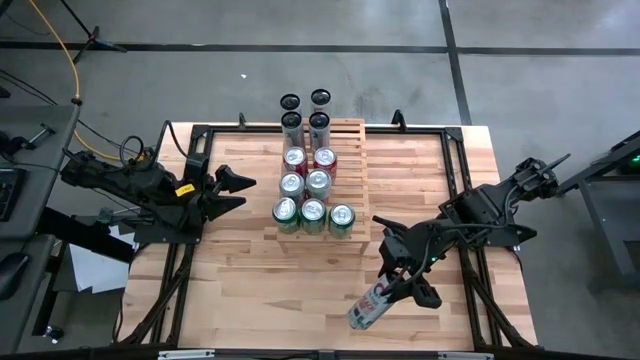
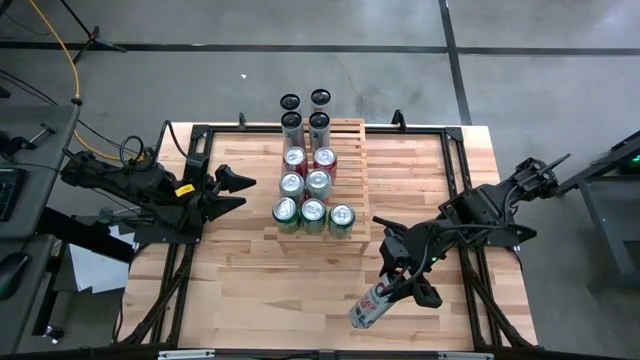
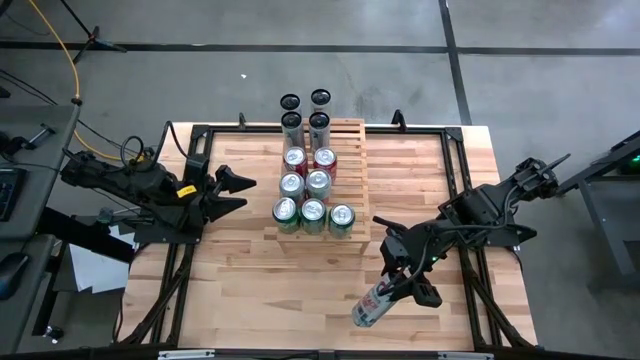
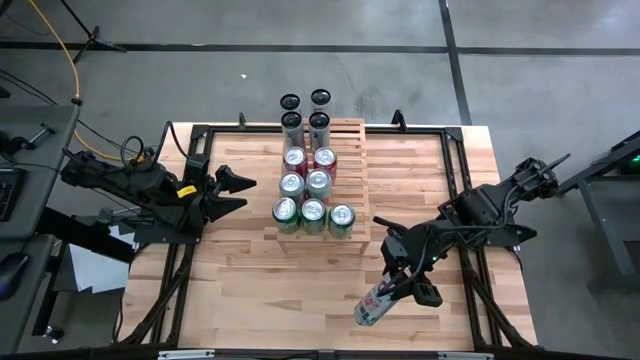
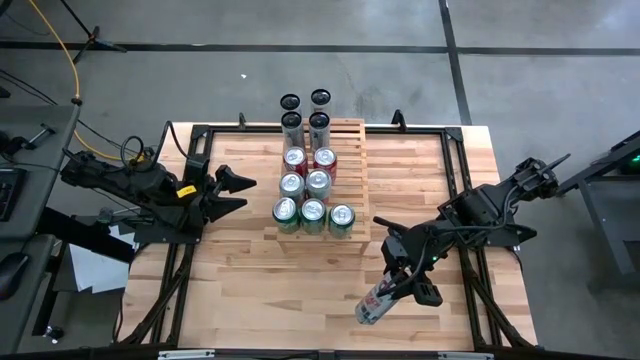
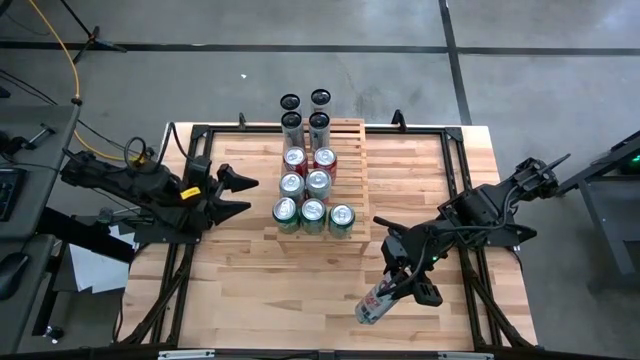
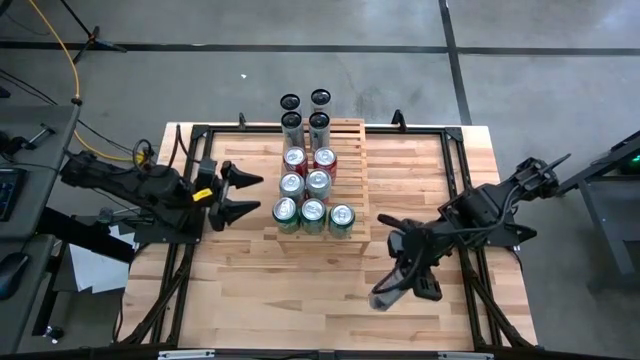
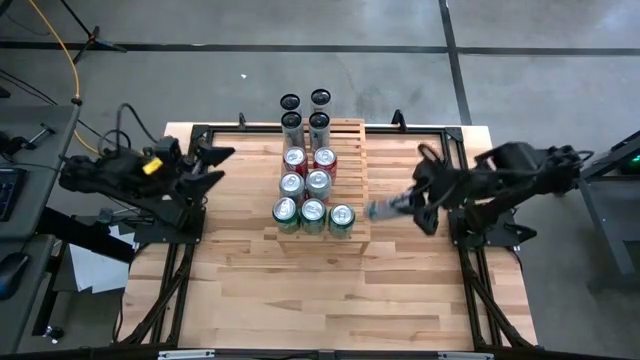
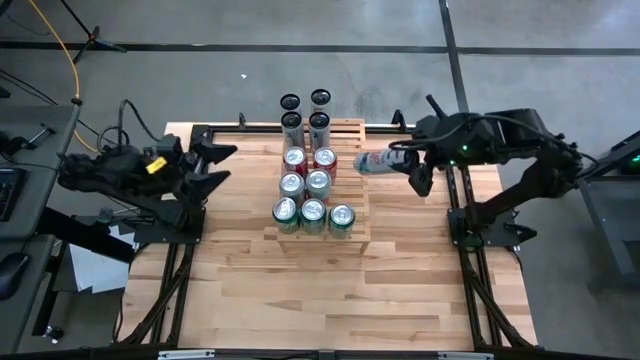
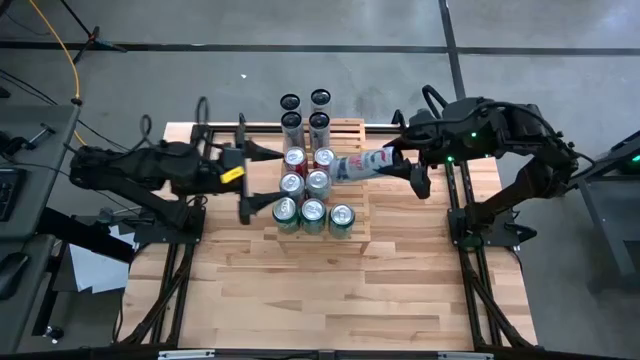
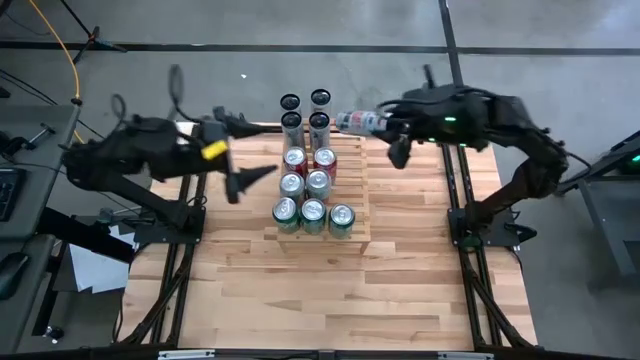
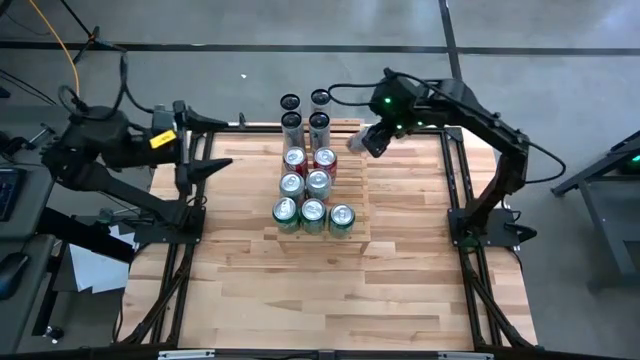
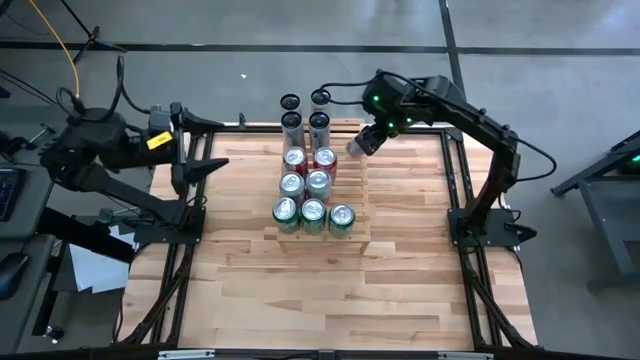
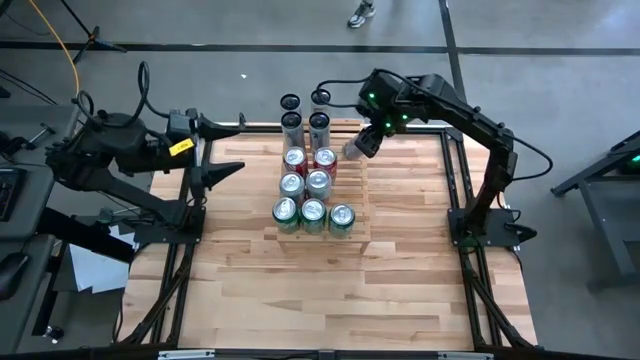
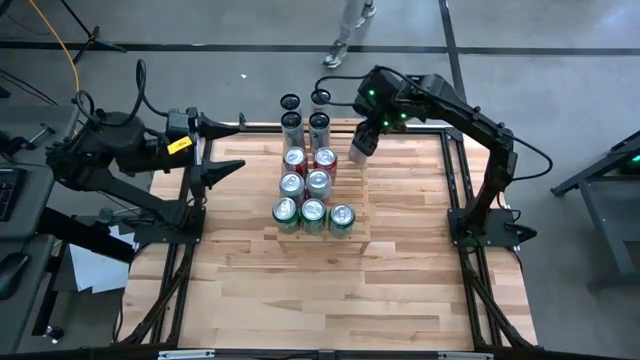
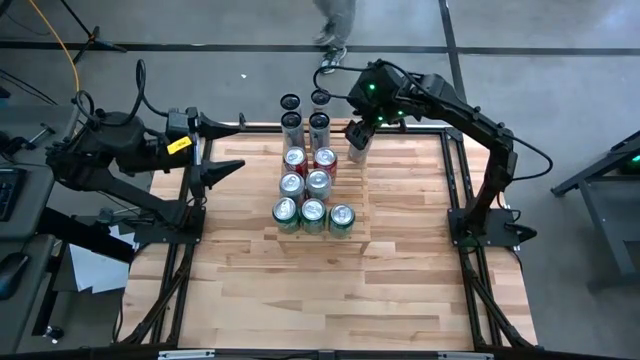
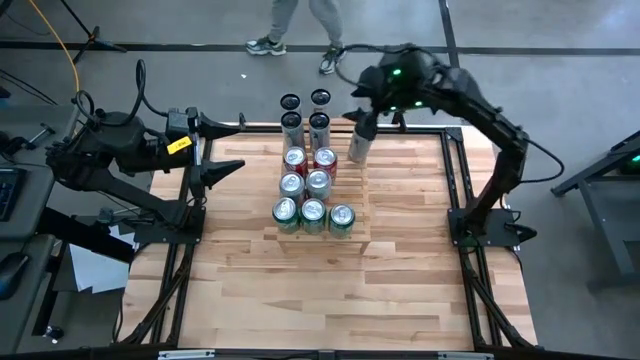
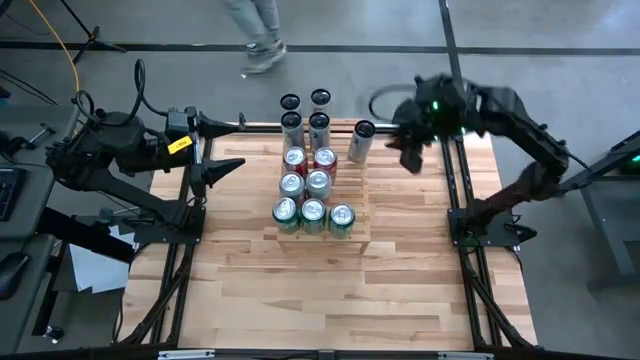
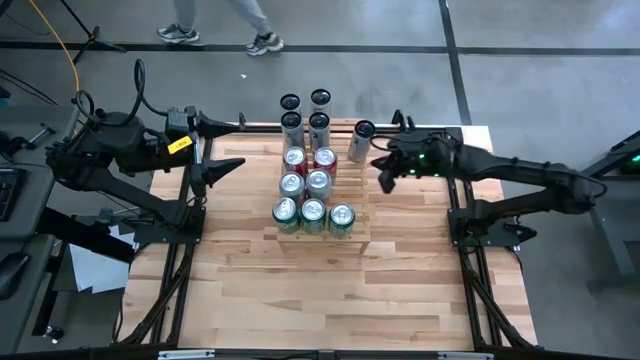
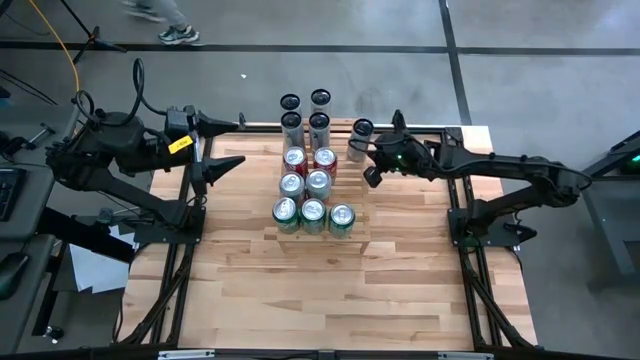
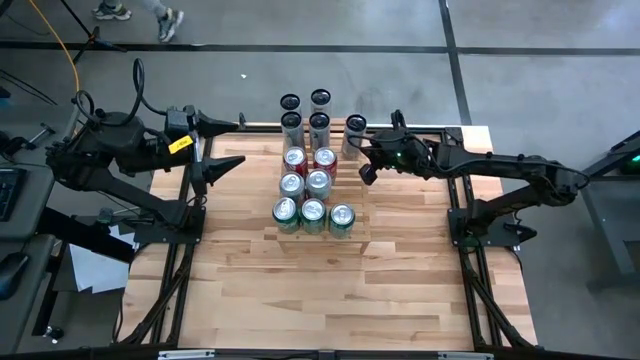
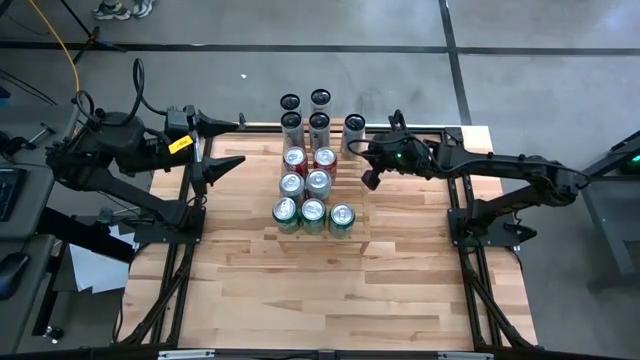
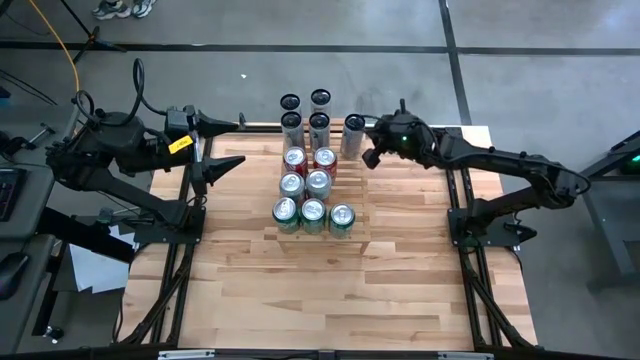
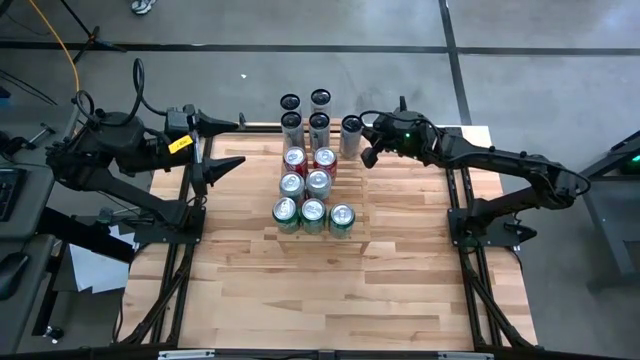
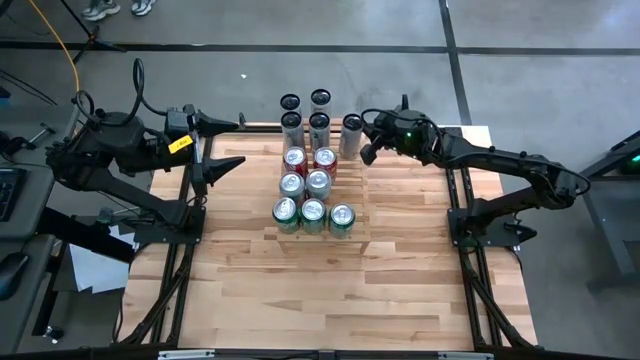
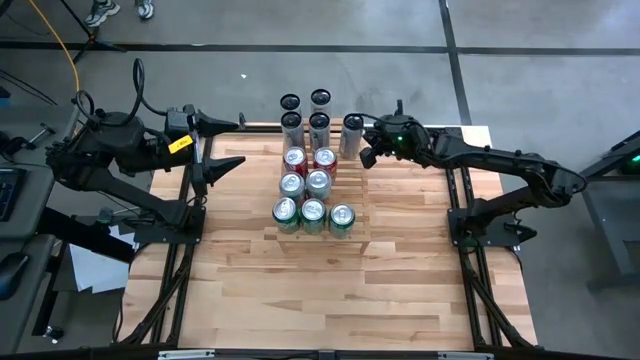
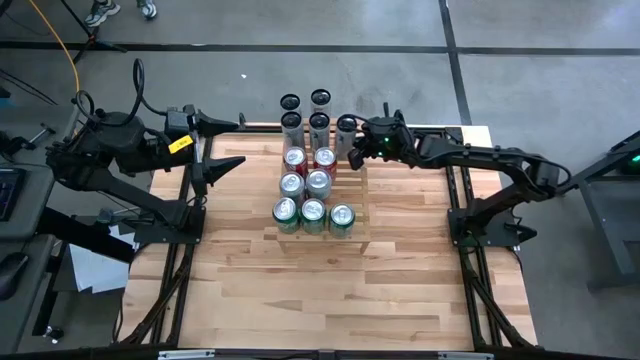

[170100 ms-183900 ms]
Task: Place canned beverage on shelf
Put the white pink soda can on the shelf aligned with the other white pink soda cans

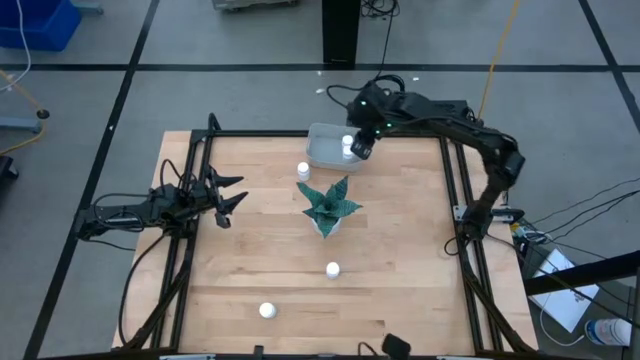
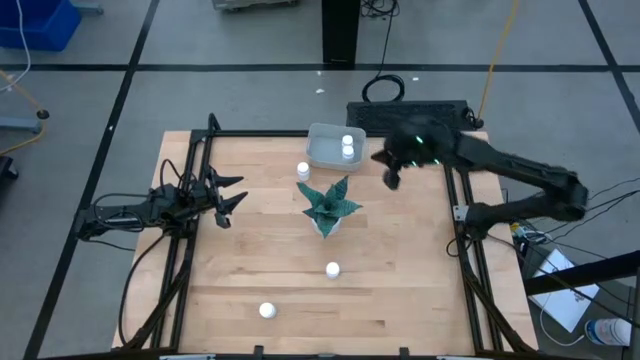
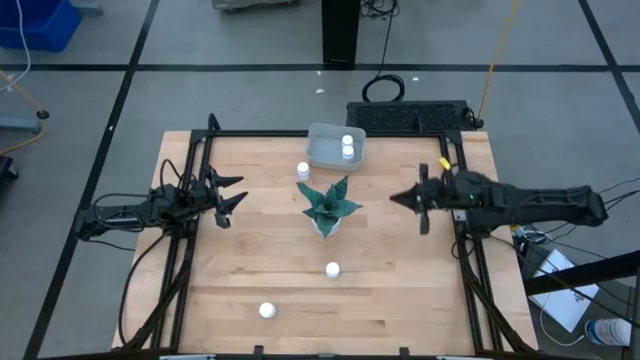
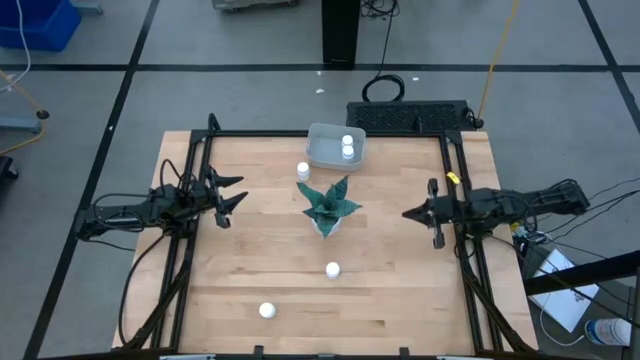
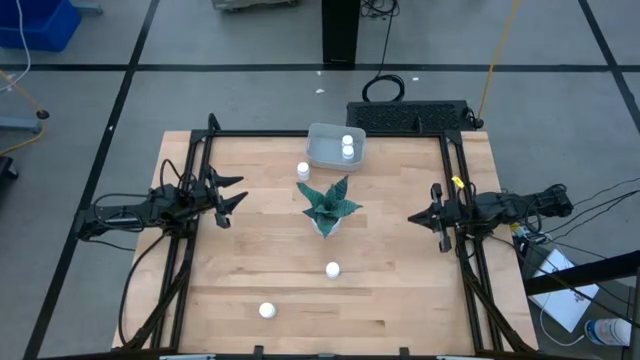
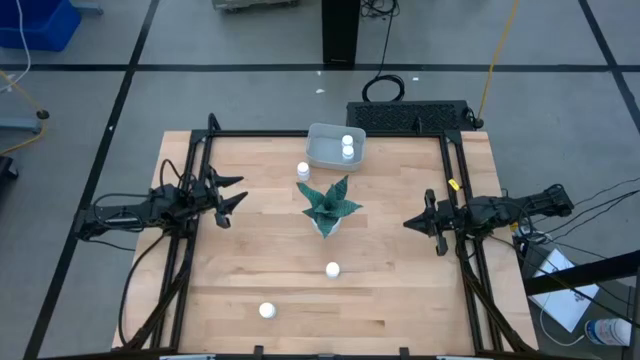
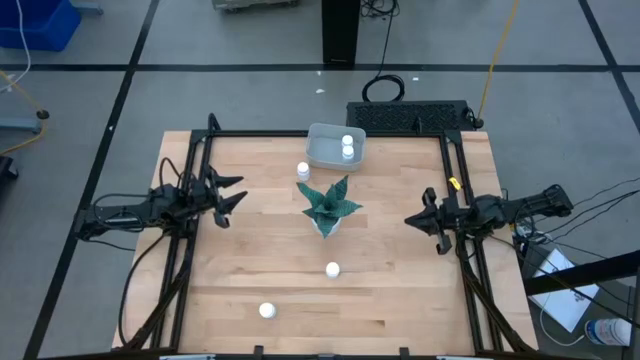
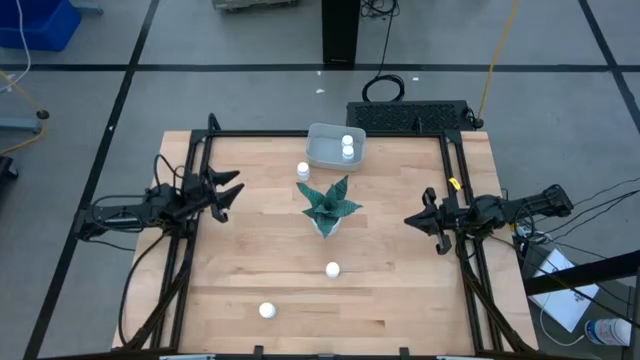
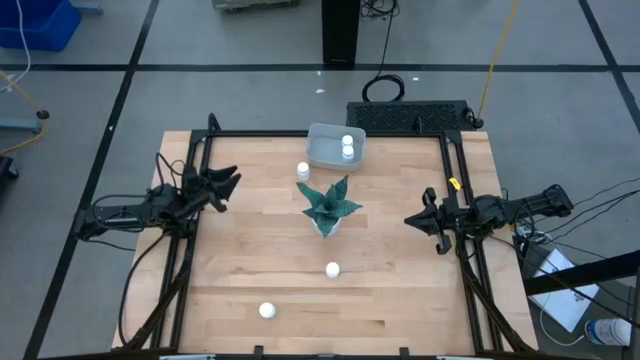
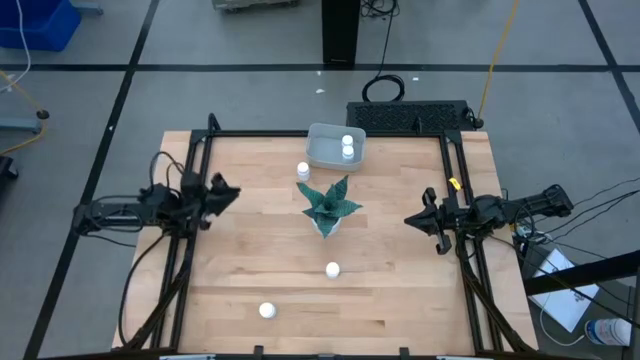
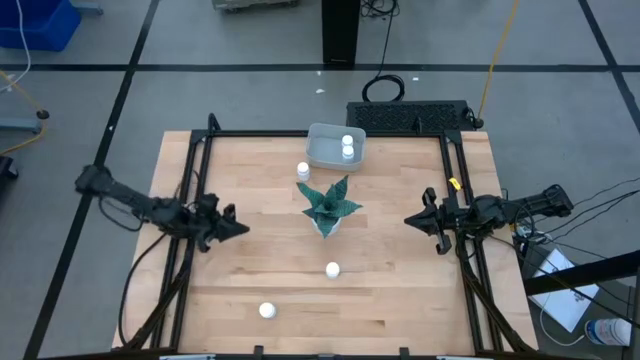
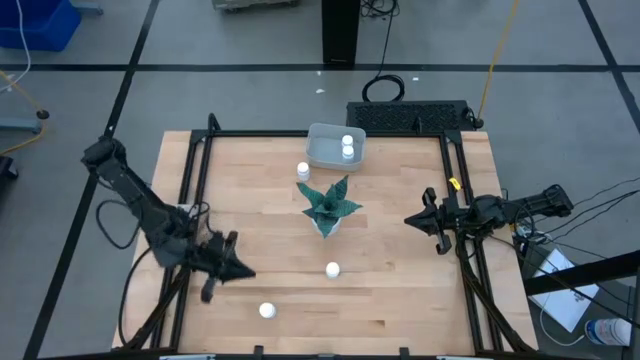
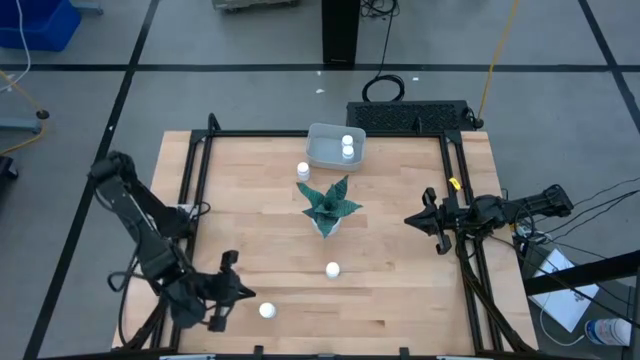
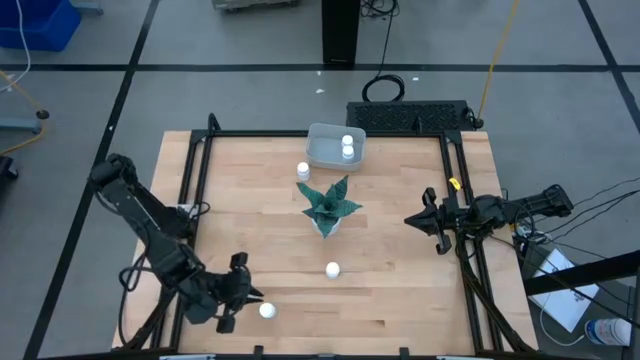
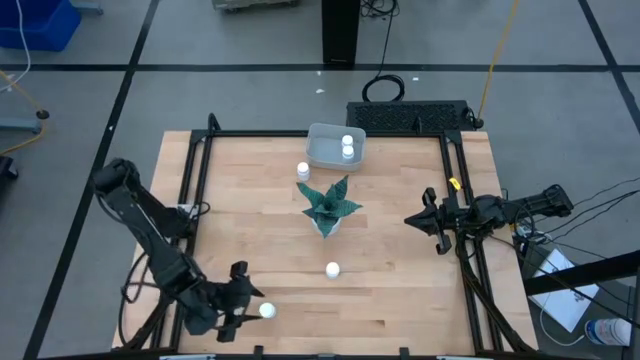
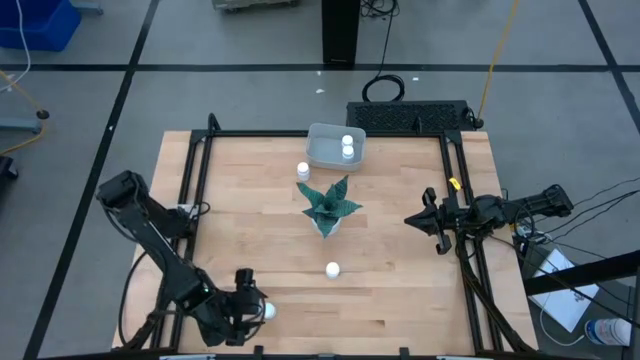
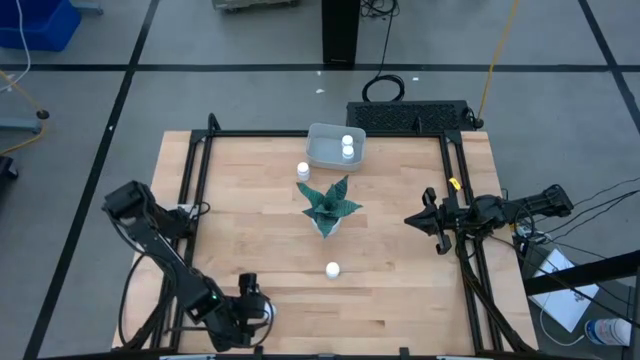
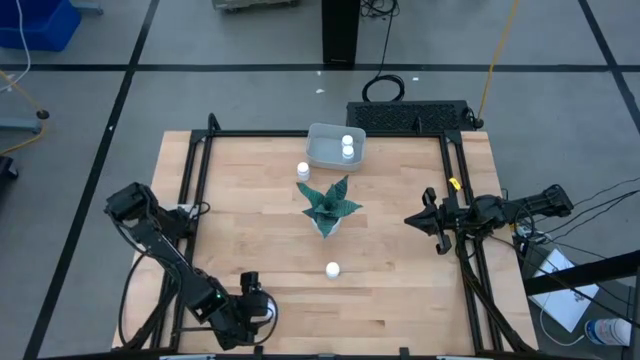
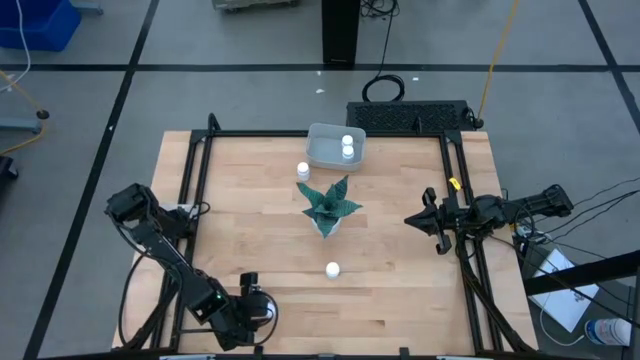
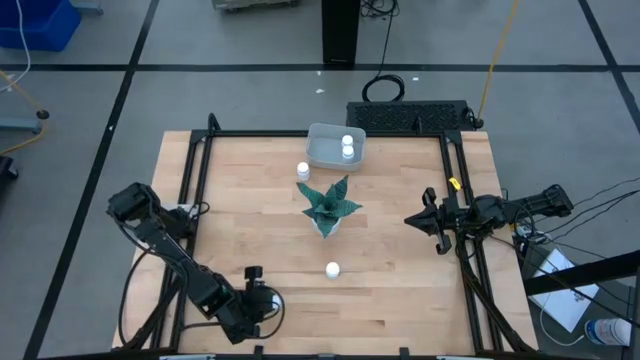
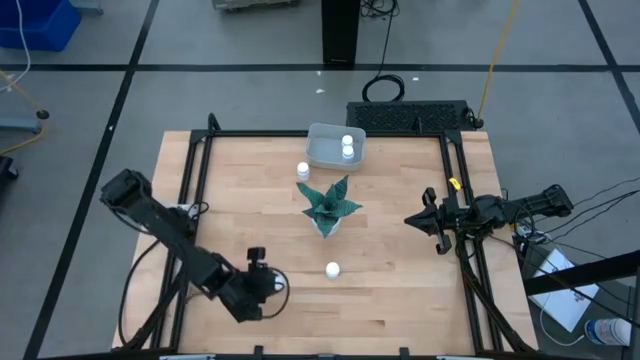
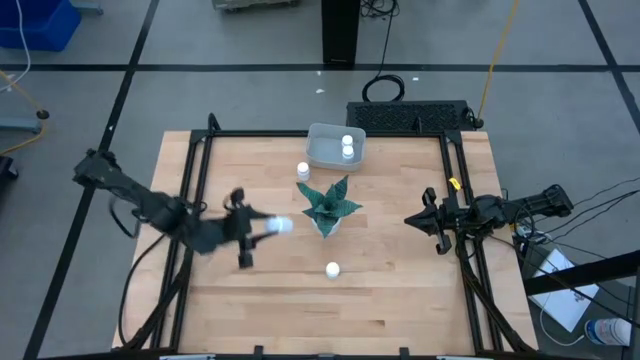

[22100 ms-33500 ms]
Task: Pick and place pill bottles into a basket
Put the white medicine bottle into the gray bin
